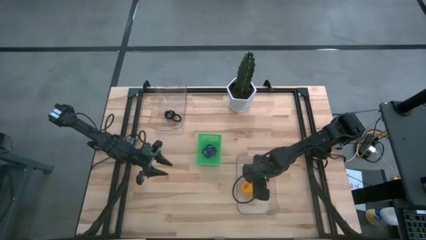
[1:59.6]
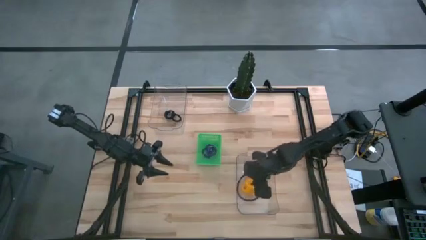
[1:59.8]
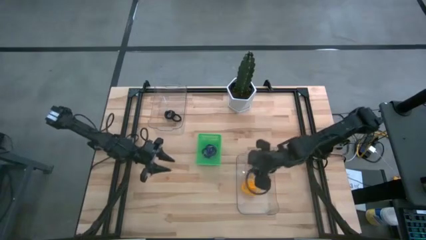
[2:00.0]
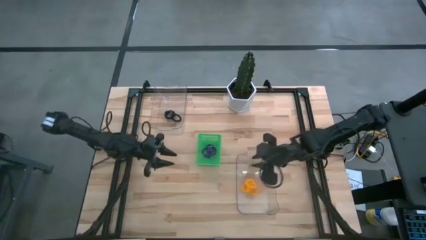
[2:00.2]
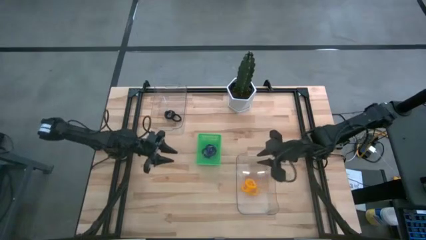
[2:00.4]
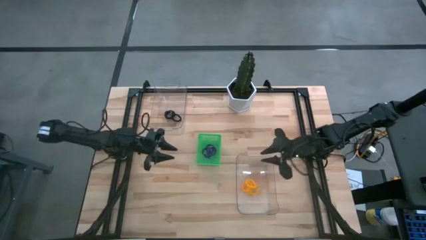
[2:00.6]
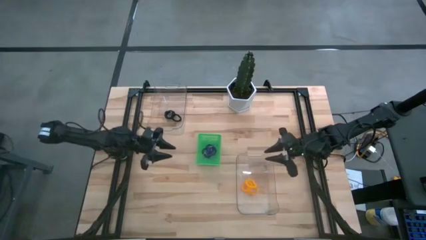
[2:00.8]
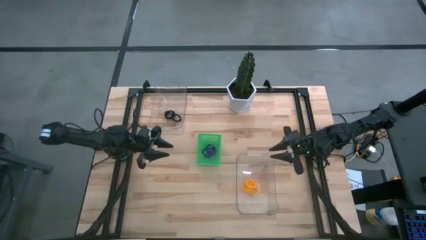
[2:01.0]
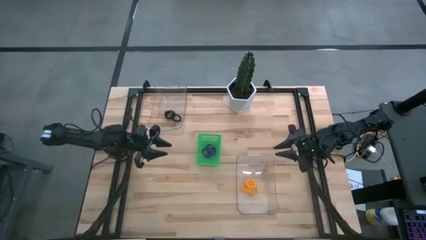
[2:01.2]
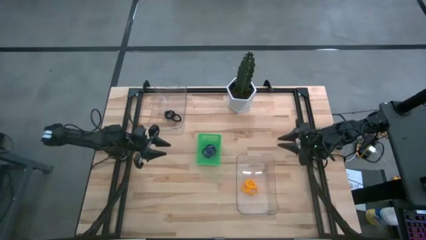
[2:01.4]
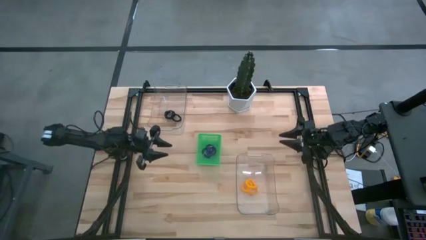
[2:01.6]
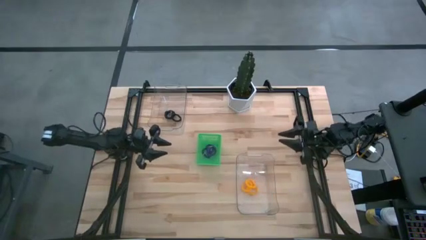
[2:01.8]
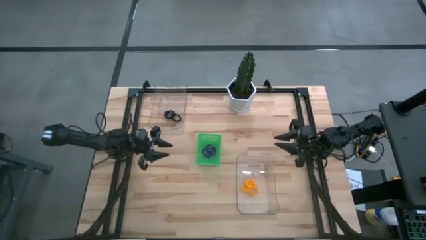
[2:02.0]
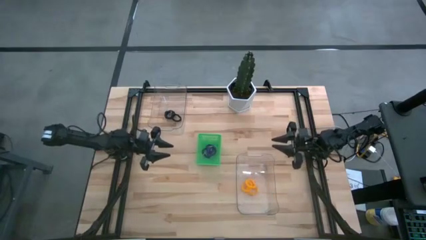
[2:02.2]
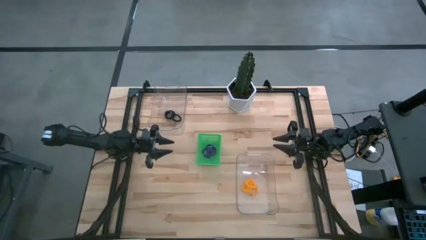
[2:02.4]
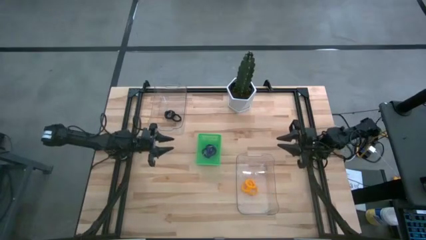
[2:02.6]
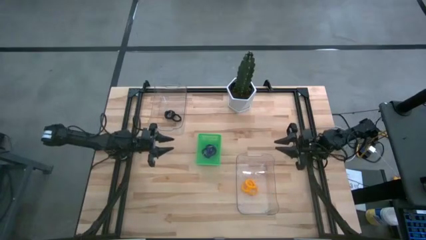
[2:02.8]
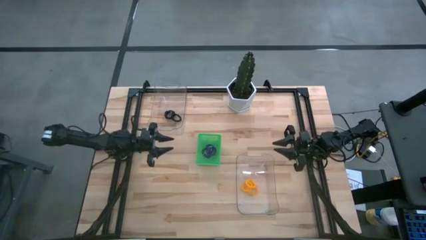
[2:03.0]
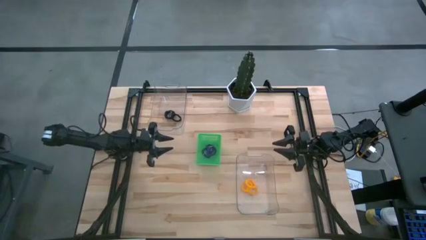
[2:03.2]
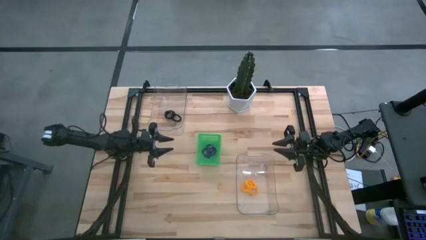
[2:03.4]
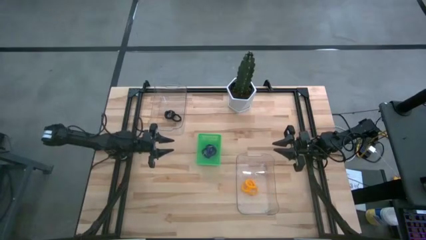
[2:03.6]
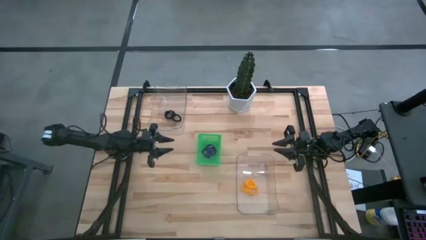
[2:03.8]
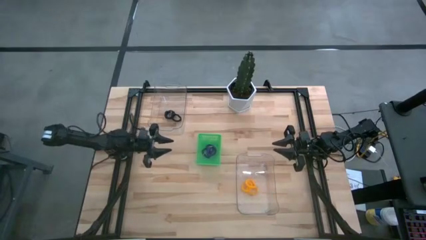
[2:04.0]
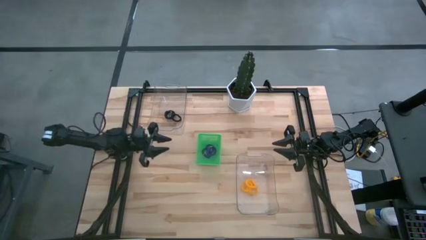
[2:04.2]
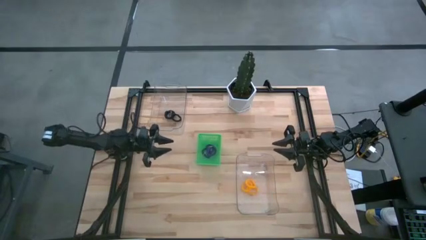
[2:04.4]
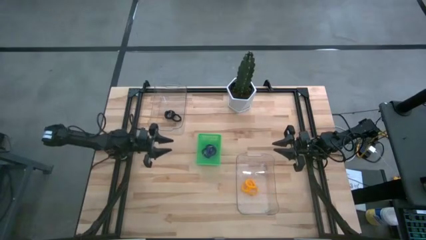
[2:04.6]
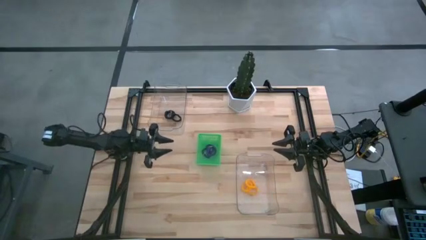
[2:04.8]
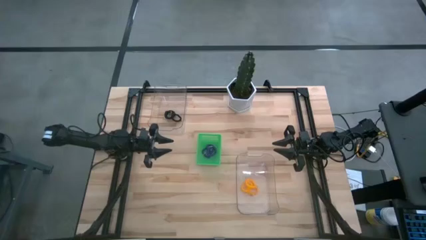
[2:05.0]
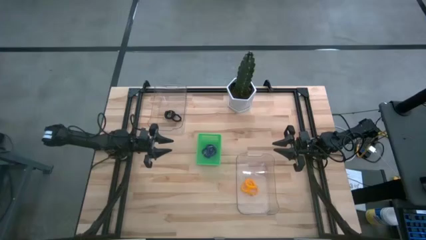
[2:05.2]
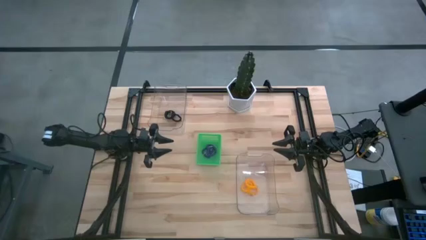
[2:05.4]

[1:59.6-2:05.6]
Task: Sort spring keychains
Return to Home Position

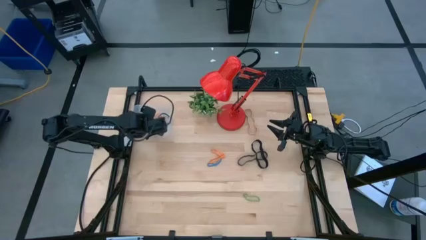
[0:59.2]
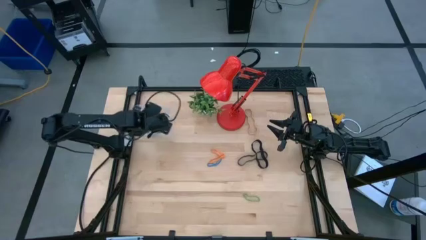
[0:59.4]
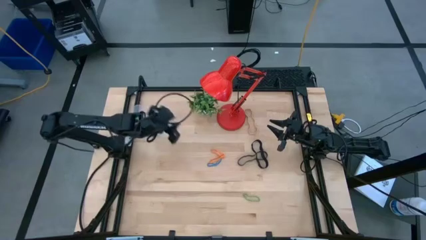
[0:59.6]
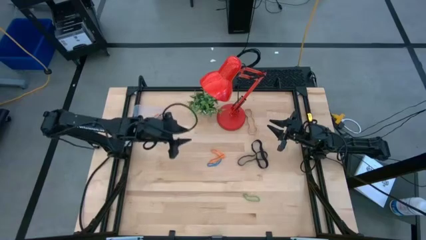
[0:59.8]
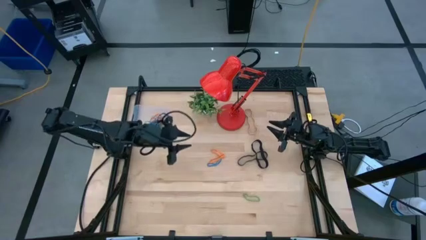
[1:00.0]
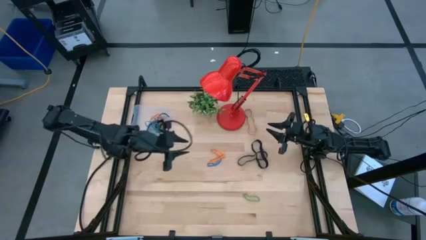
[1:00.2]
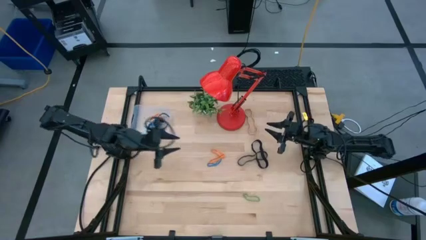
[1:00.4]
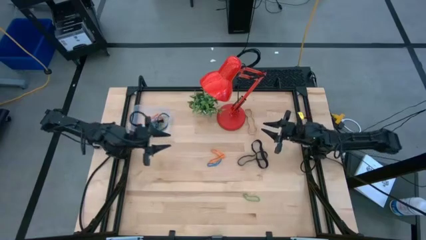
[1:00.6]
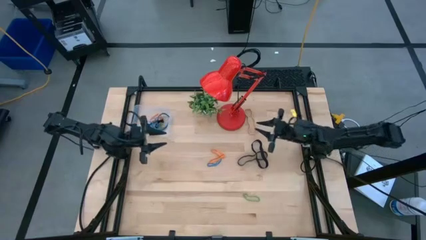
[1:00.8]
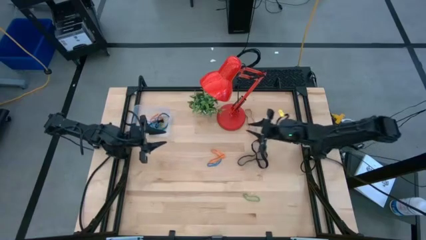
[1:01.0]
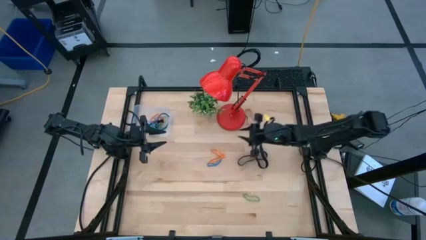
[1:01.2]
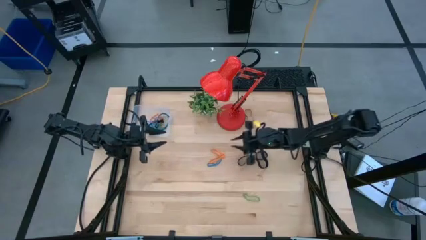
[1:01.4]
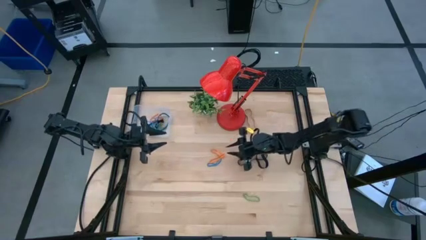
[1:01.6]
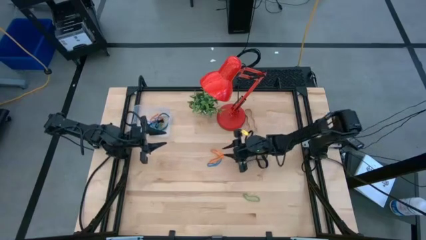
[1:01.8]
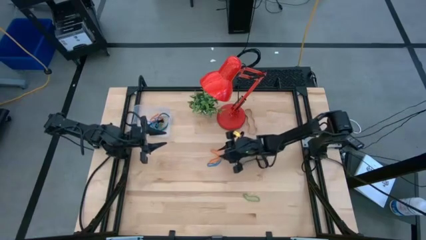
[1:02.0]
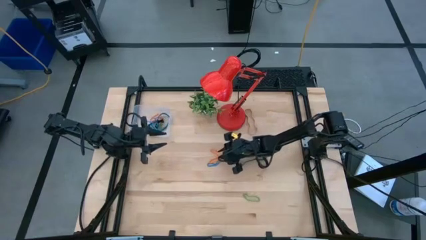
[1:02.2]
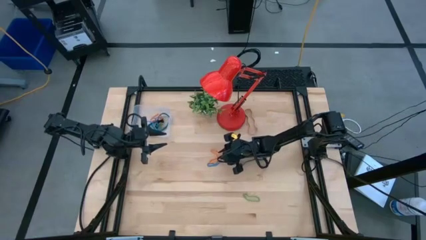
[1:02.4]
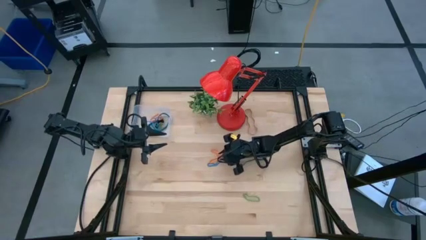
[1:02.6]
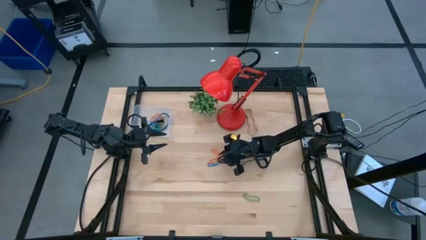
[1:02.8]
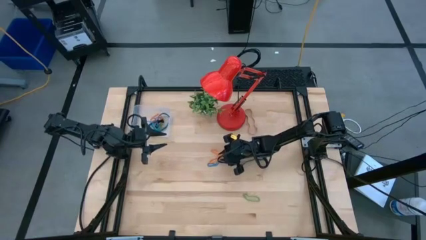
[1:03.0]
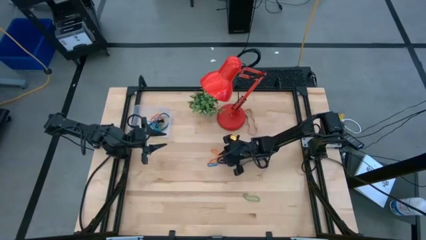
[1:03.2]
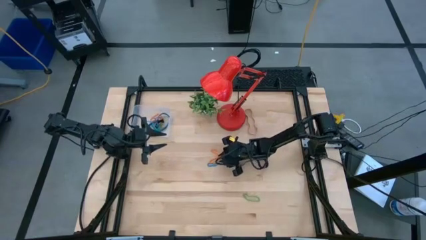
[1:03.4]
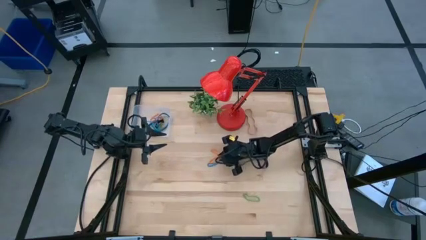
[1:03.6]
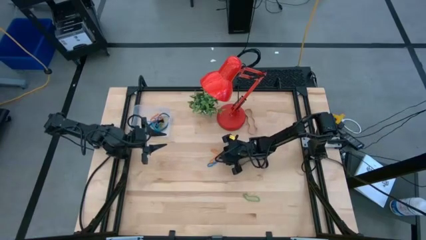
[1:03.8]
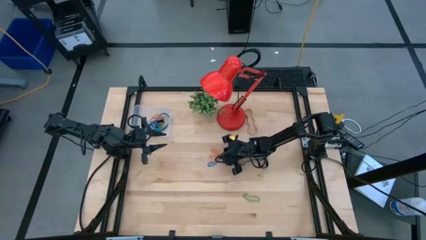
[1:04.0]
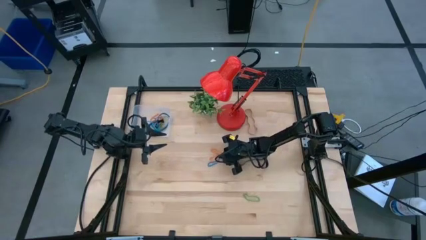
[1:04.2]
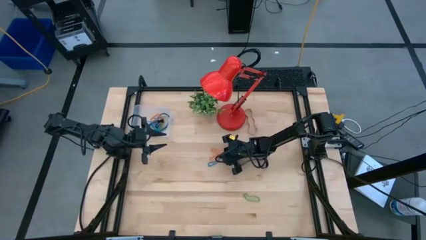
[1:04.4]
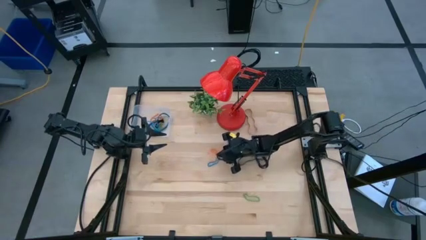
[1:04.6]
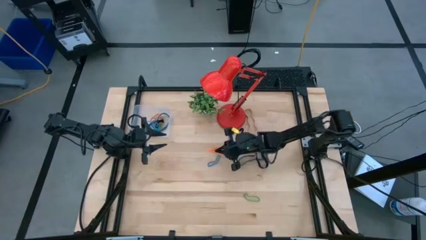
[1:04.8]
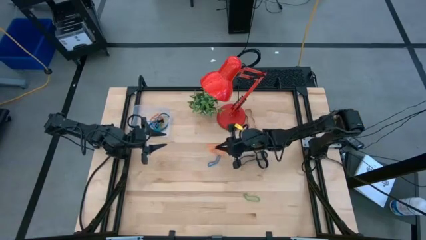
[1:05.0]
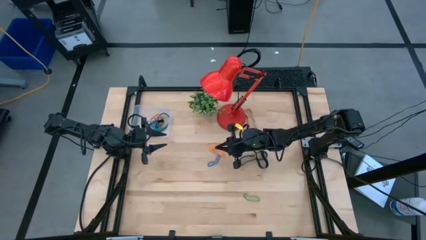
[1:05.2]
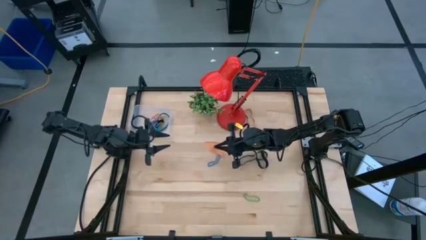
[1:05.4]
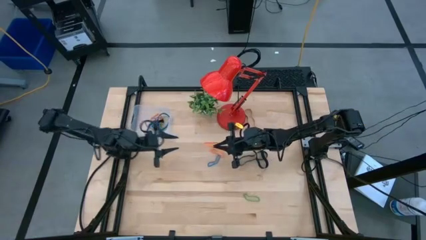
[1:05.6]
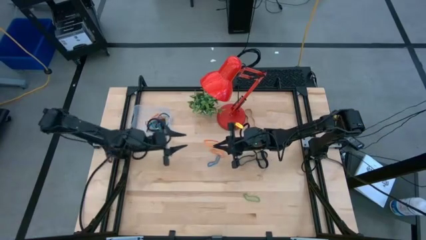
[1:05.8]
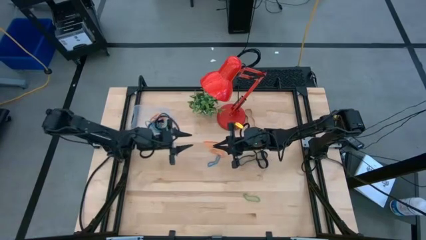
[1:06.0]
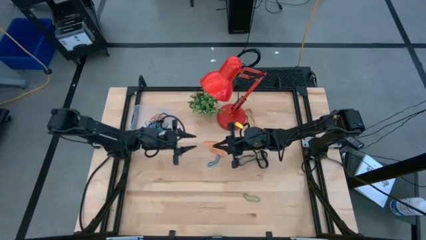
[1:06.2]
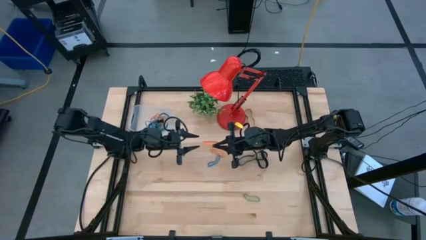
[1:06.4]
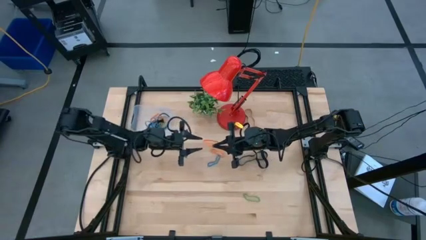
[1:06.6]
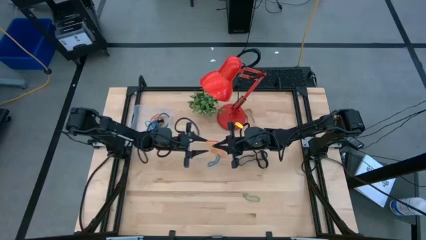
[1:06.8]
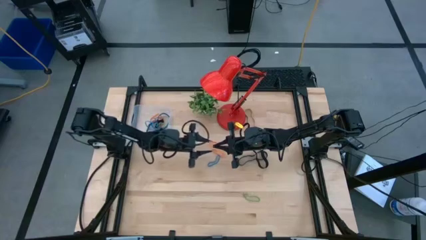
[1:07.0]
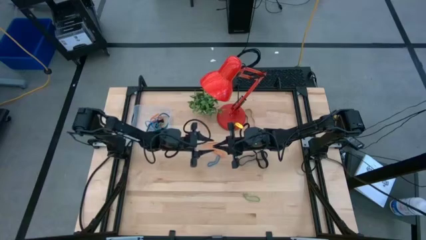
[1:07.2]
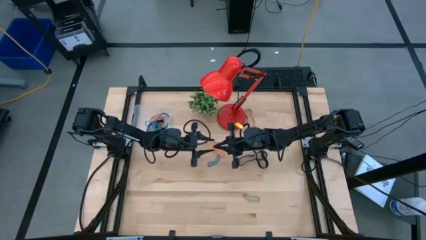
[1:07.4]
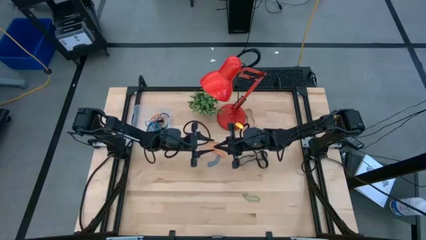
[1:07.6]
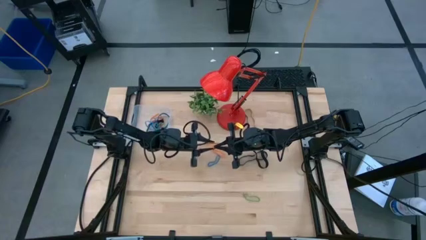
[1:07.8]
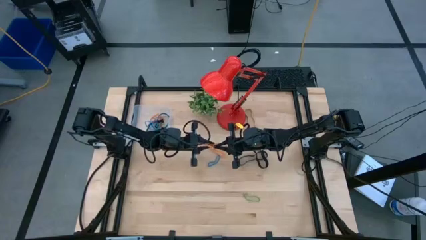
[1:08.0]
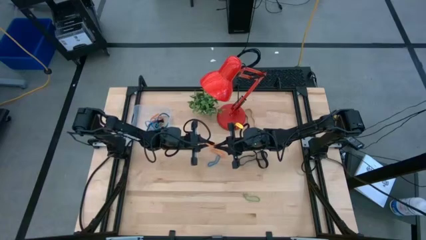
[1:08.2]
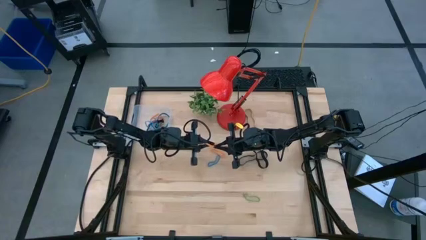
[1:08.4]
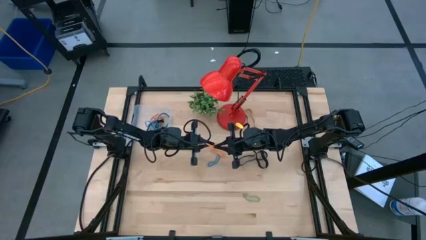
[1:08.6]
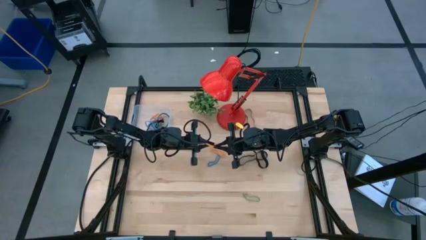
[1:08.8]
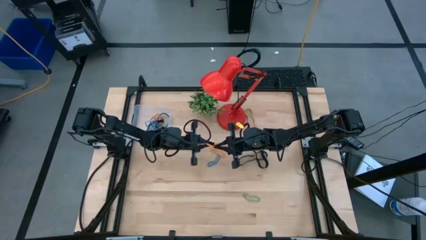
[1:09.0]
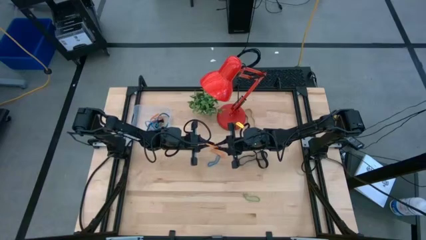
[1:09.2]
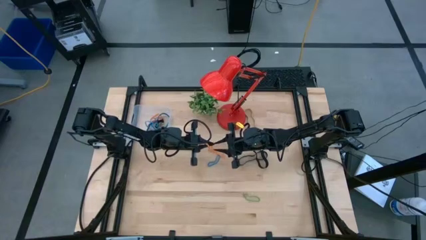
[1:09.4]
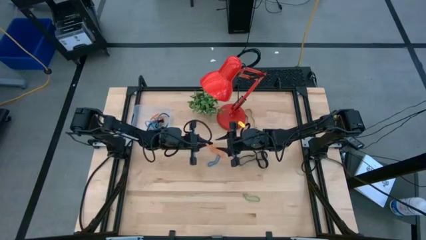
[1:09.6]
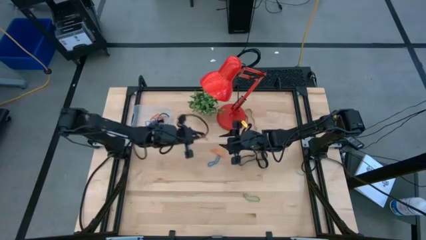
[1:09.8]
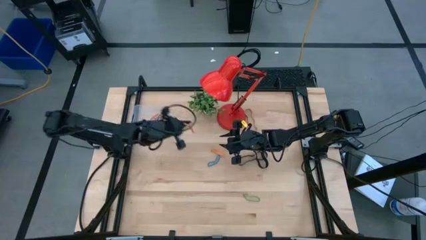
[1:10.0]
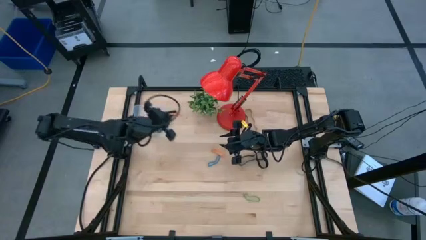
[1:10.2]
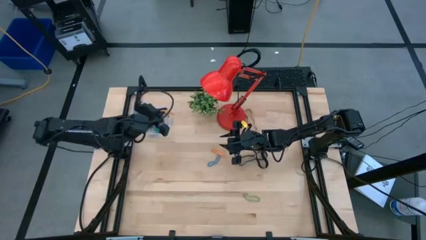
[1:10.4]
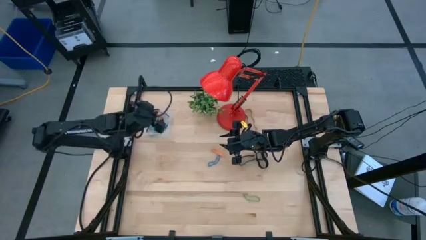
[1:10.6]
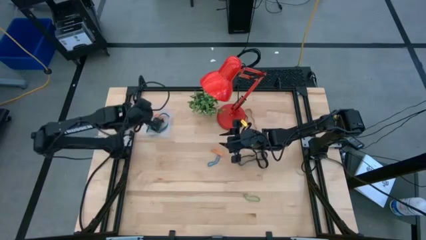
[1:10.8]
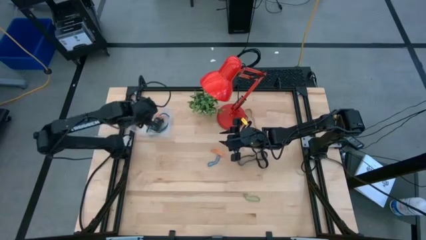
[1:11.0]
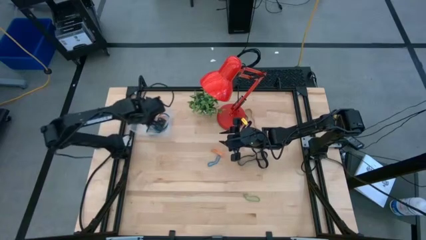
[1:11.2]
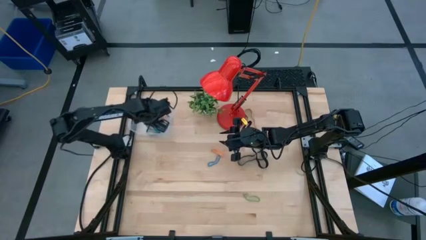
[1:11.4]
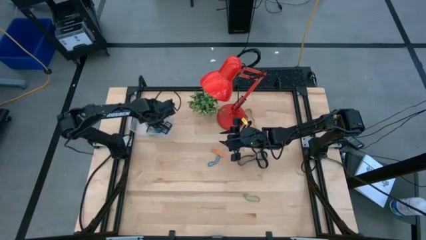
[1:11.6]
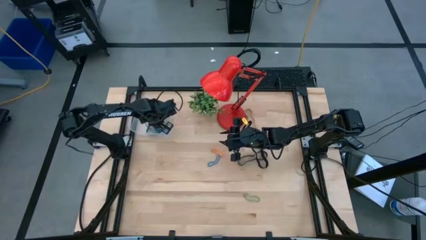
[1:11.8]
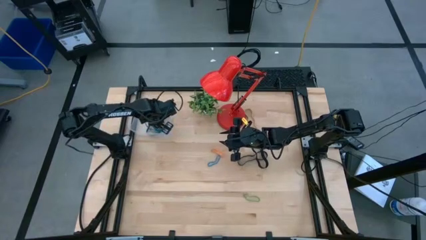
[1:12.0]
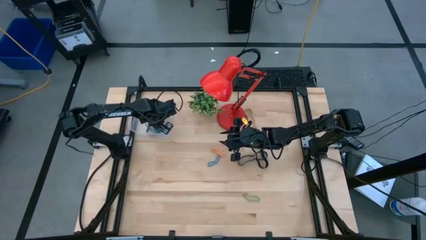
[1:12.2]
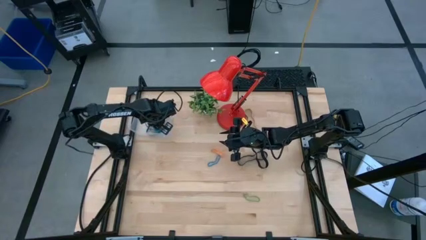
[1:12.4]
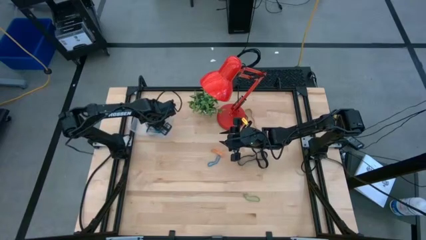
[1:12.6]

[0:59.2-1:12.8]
Task: Pick and place rubber bands into bin
Put the orange rubber band into the transparent bin
